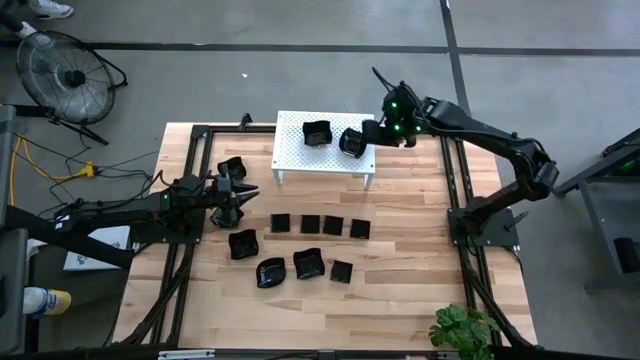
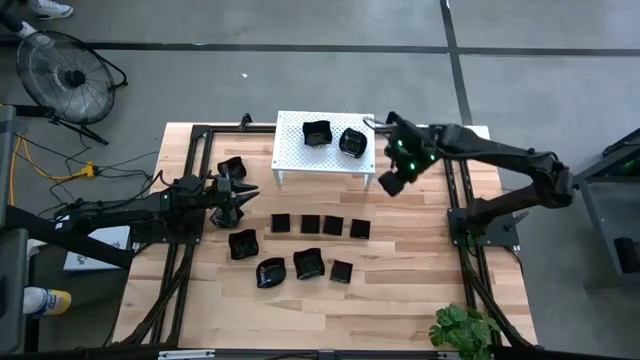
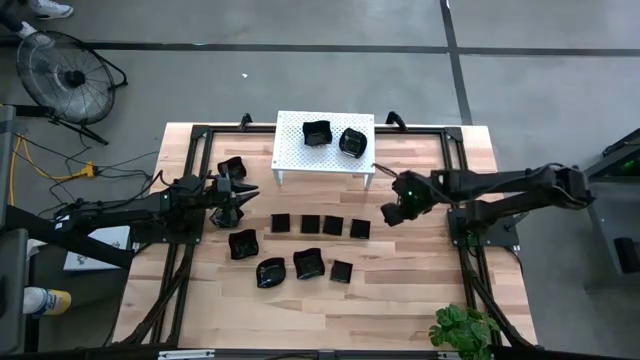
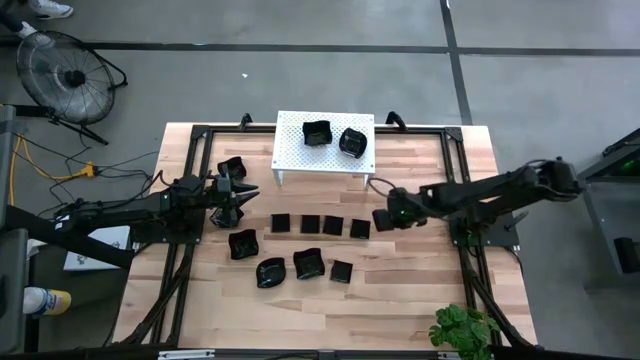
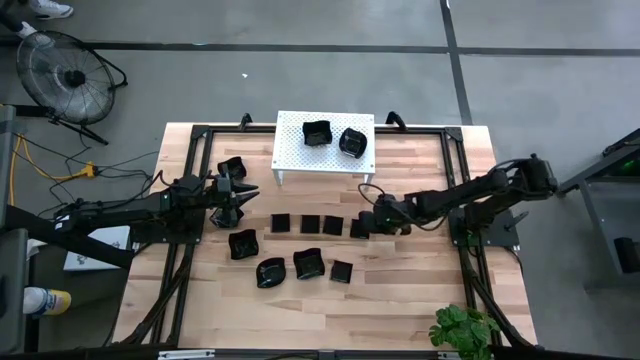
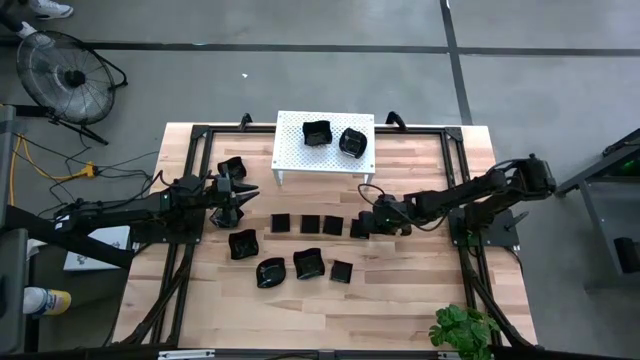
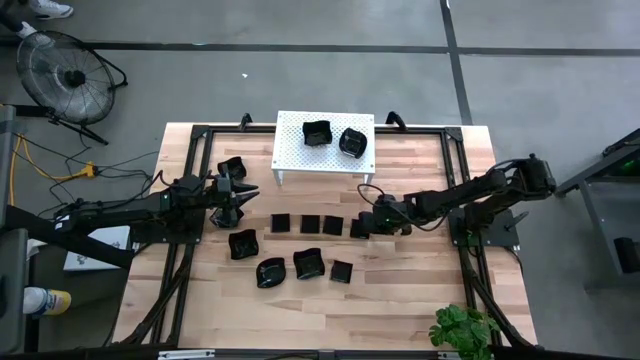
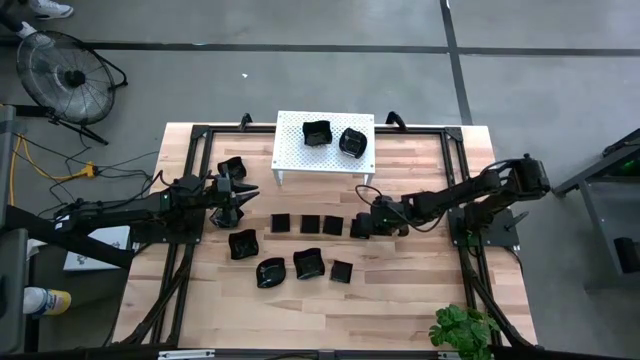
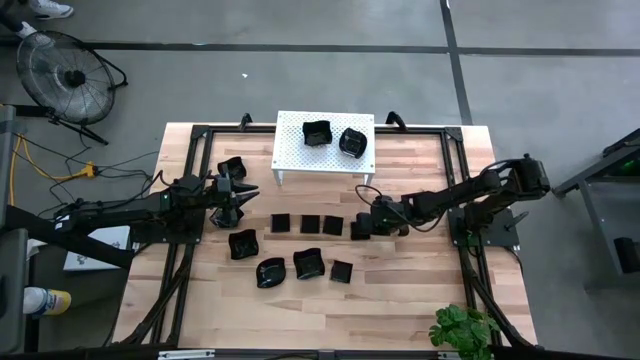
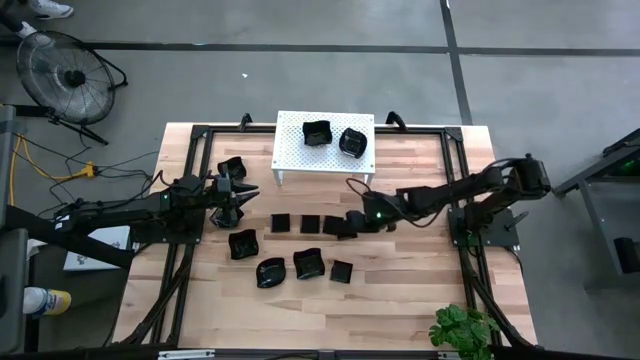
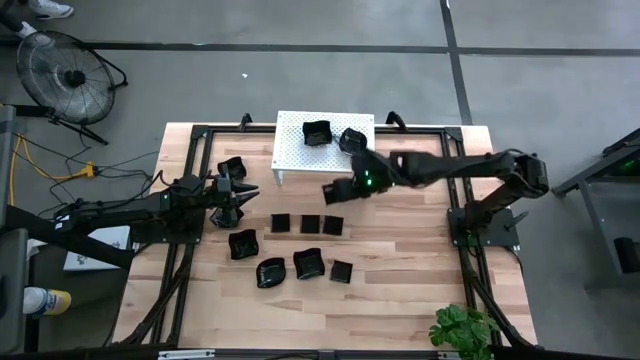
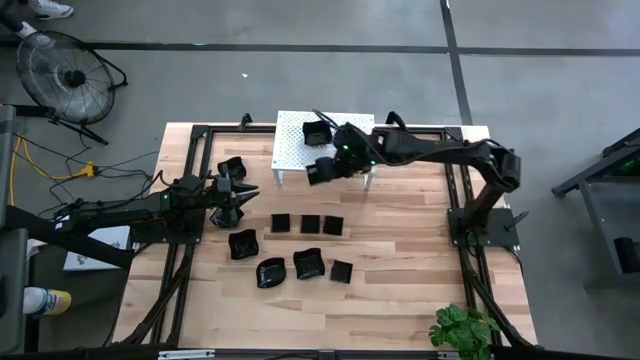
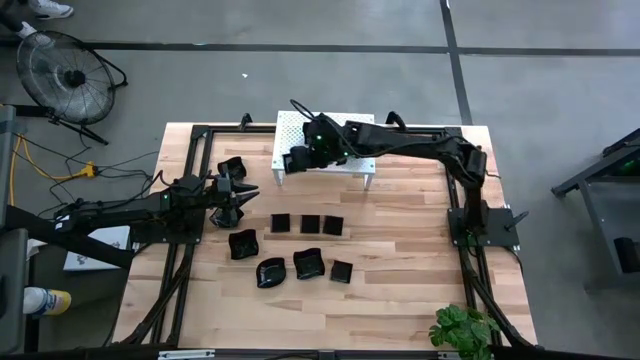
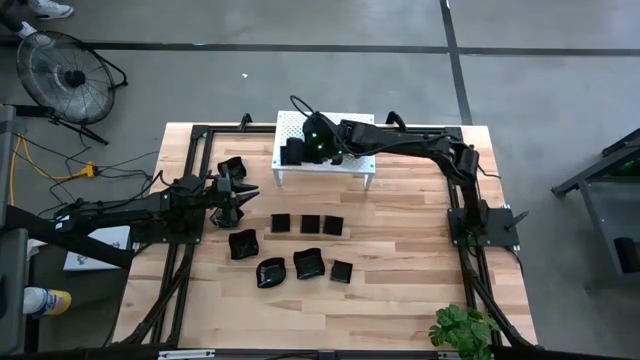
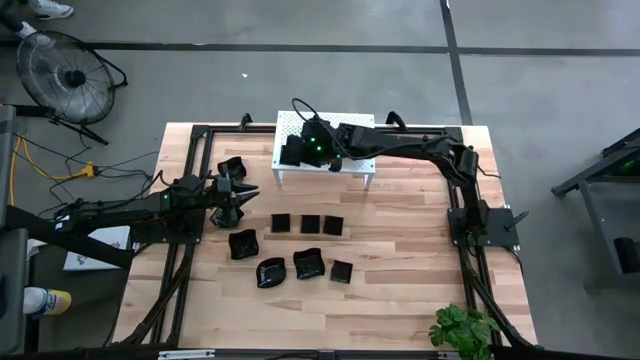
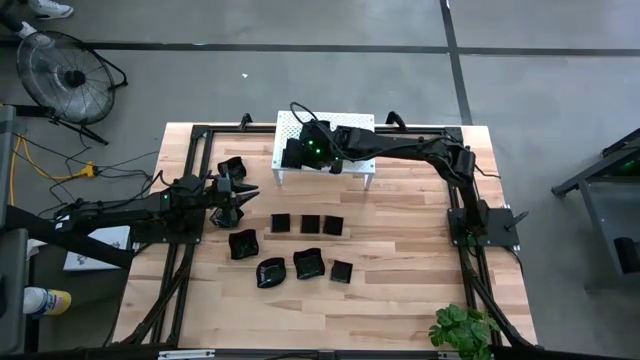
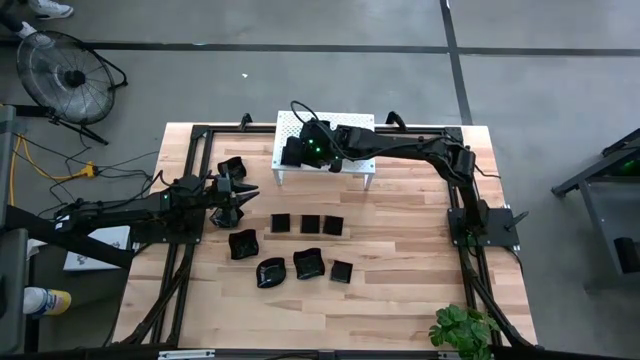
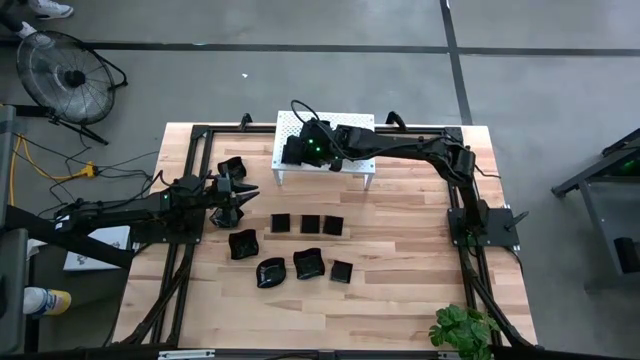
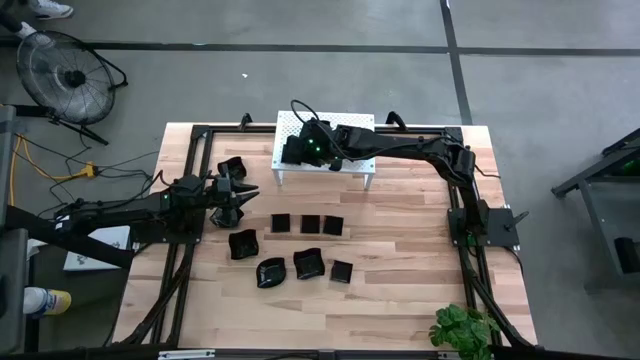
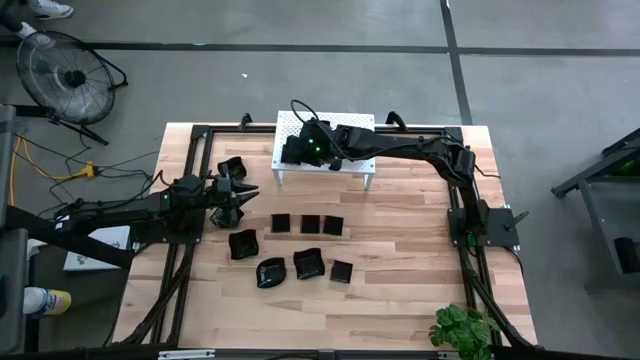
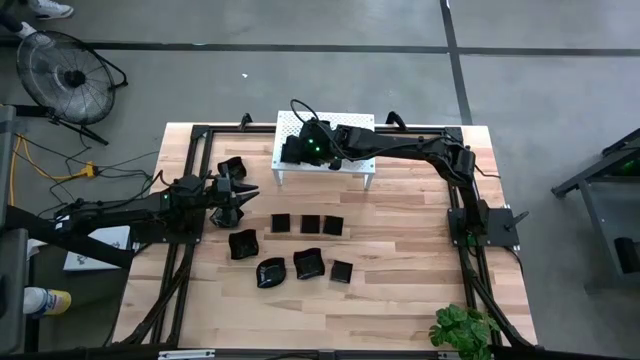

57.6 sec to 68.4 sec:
Task: Pick & Place Mini shaped plates
Put the square plate on the shelf

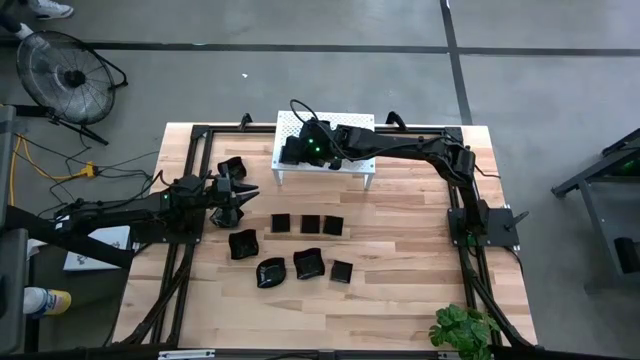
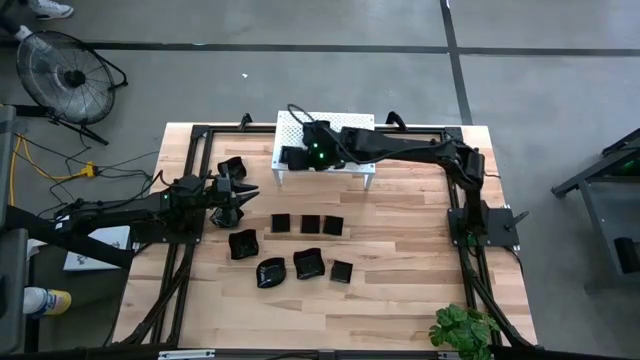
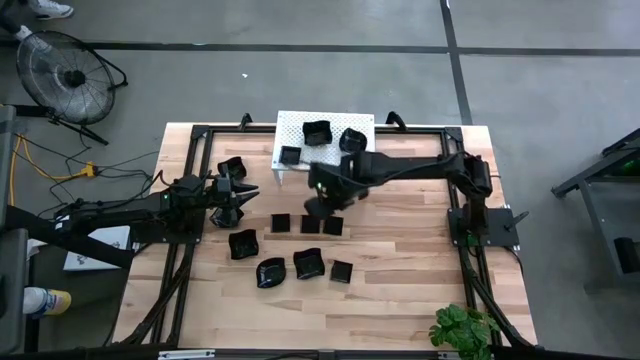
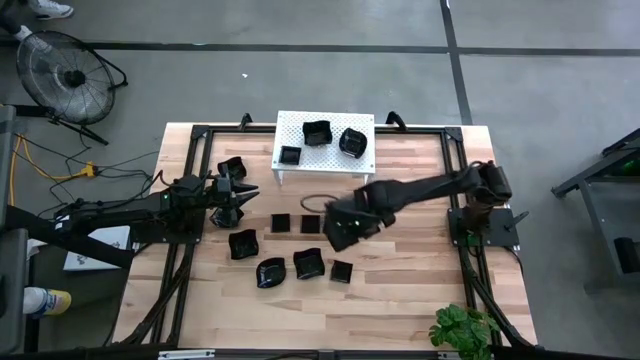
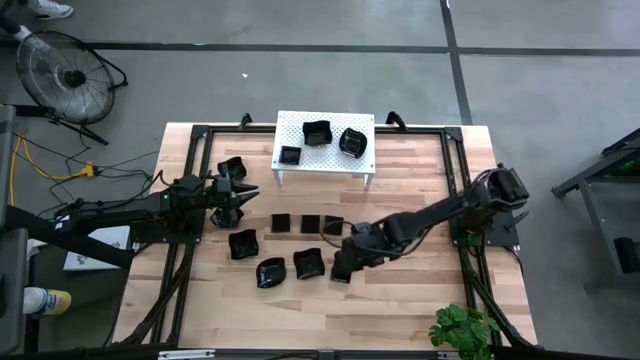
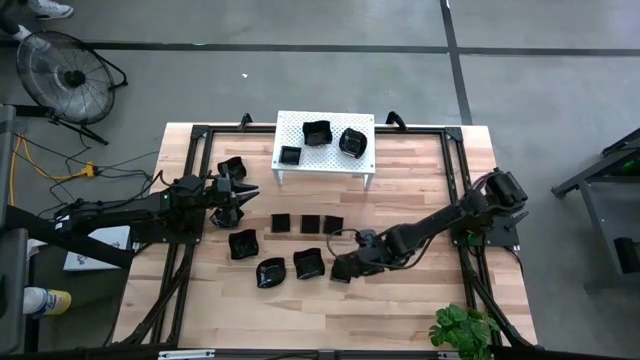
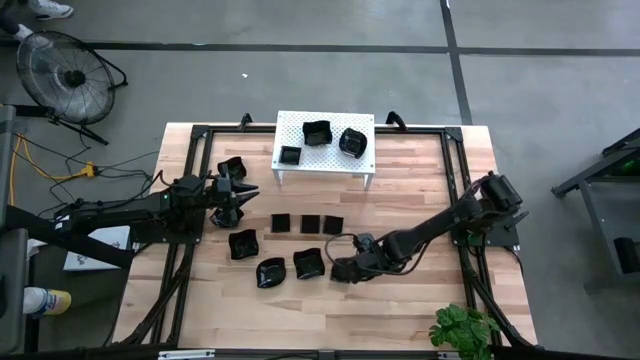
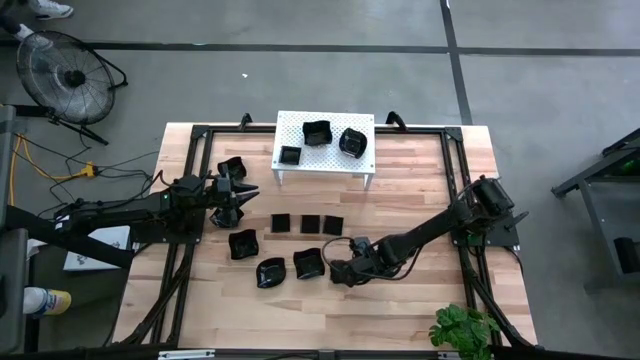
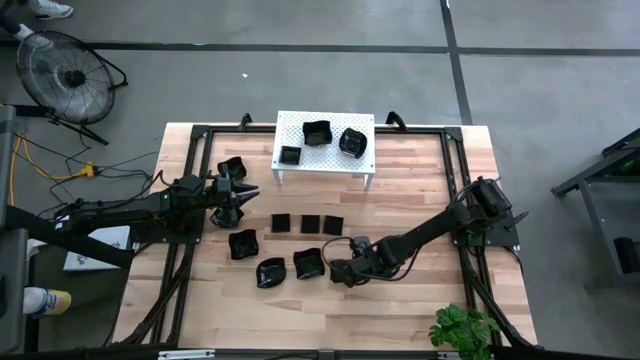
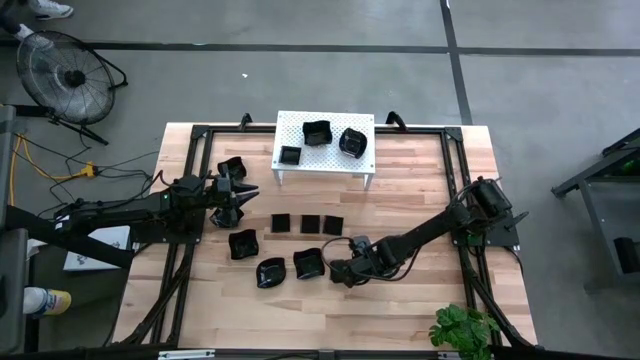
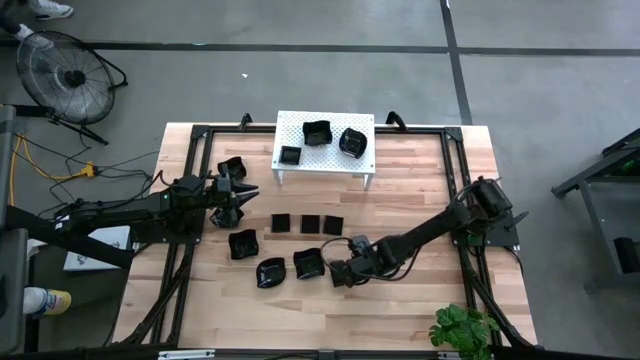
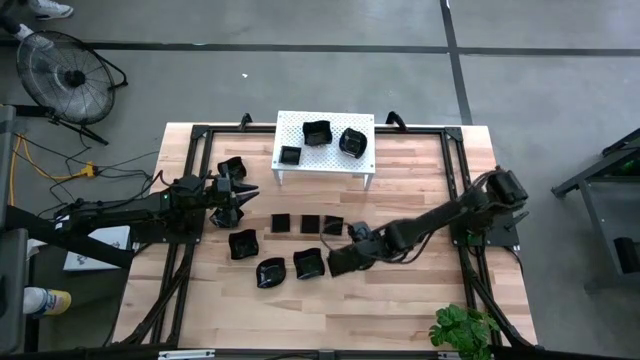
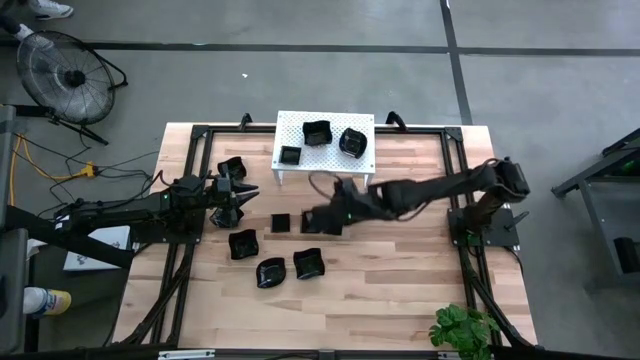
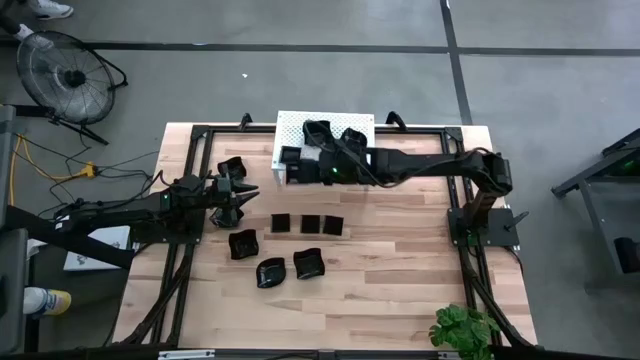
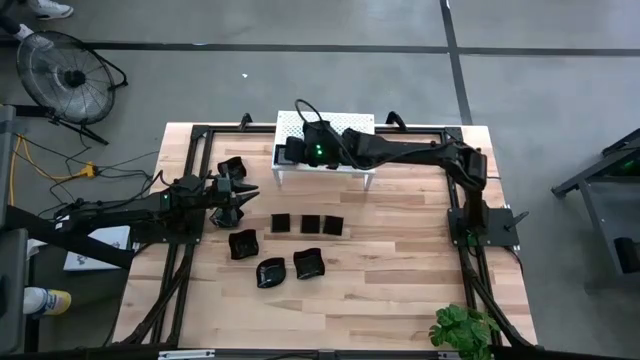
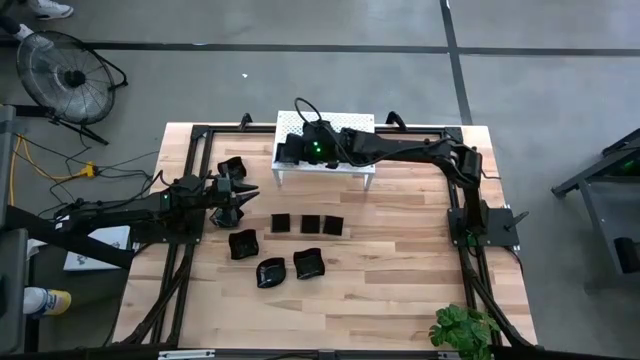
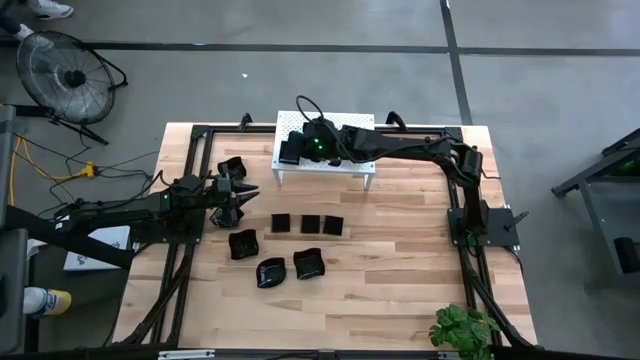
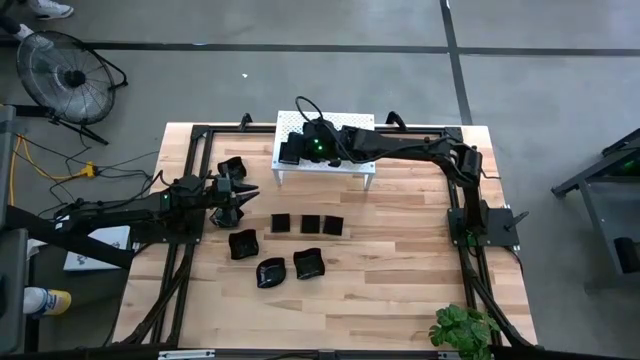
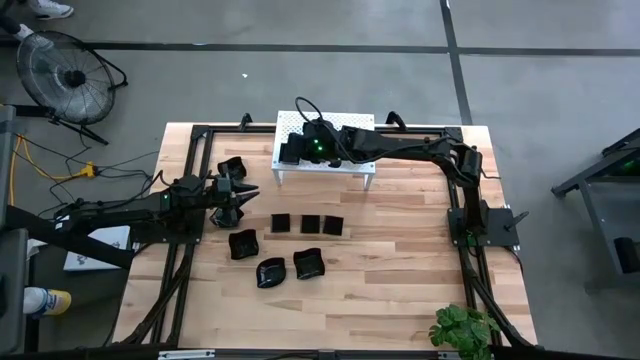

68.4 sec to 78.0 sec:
Stack the square plate on top of the other square plate on the shelf

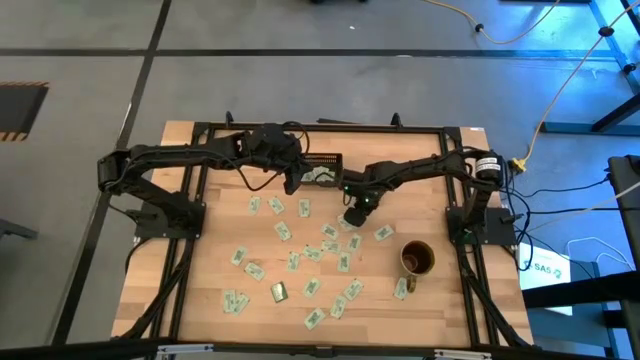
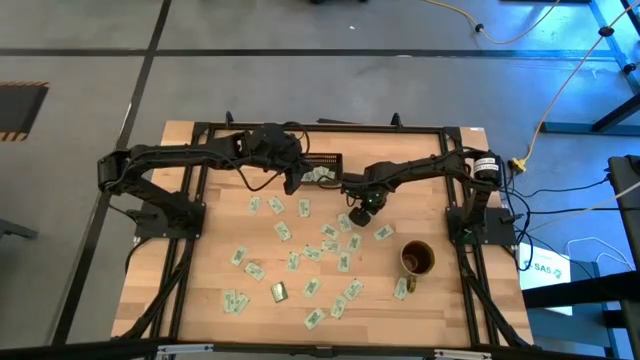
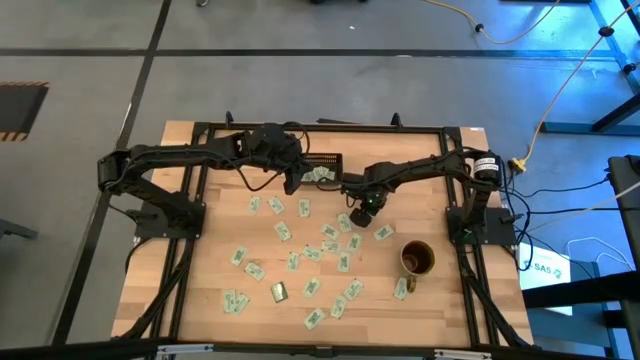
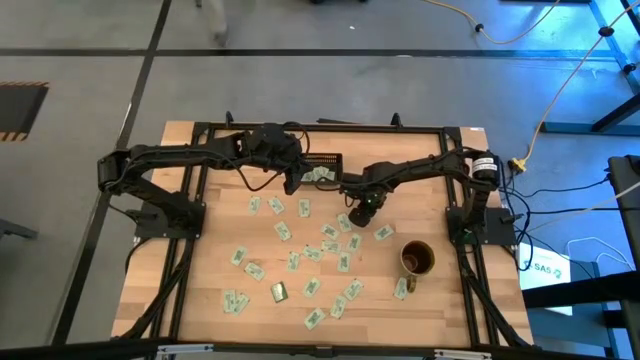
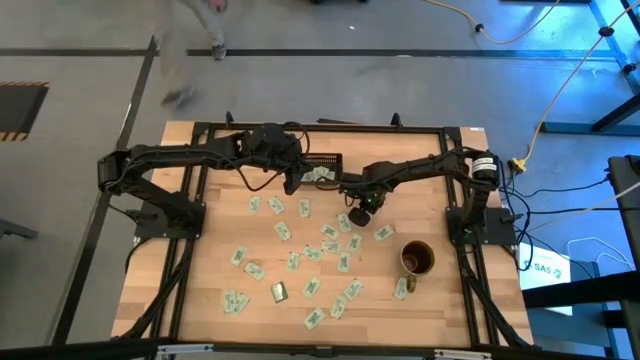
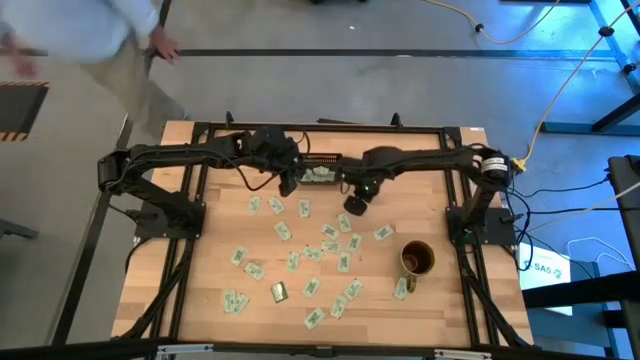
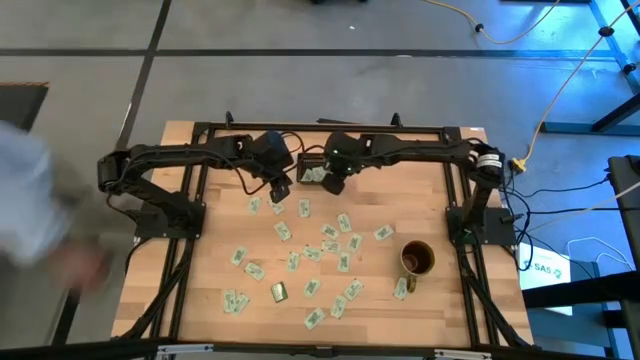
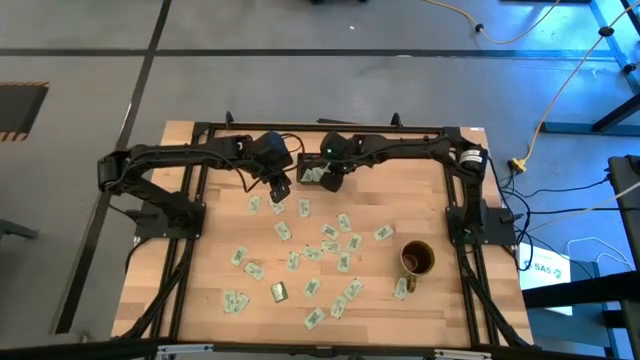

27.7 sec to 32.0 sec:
Task: Pick and place Stevia / Truvia into bins
Put the white stevia packet into the black bin
